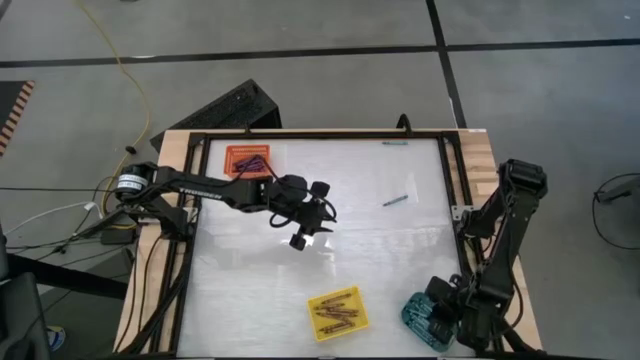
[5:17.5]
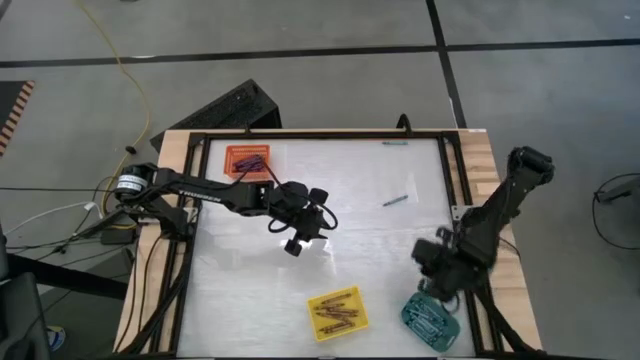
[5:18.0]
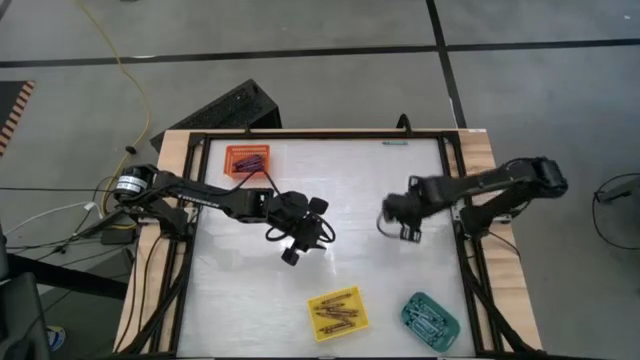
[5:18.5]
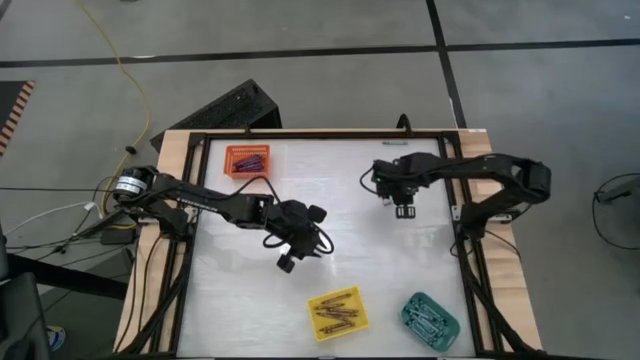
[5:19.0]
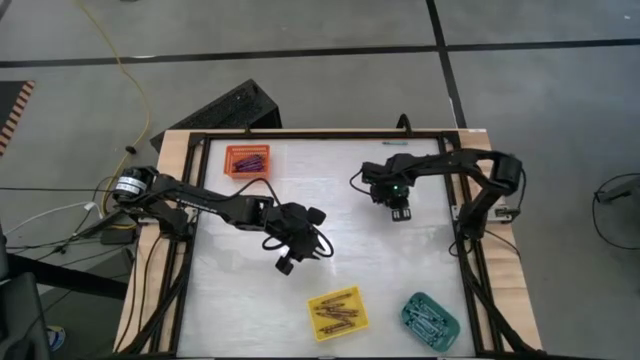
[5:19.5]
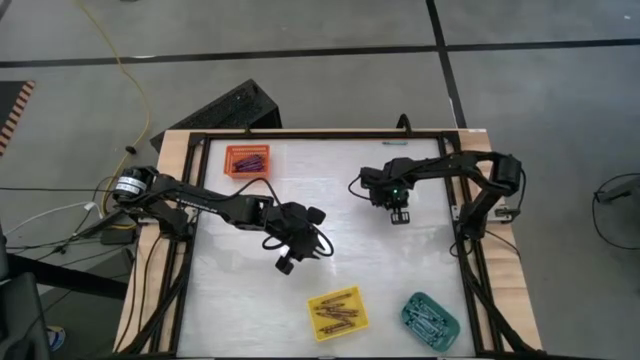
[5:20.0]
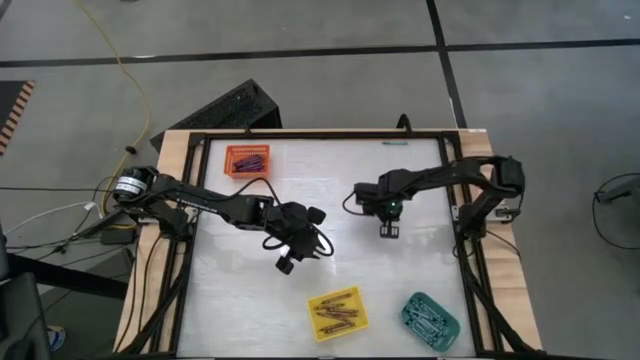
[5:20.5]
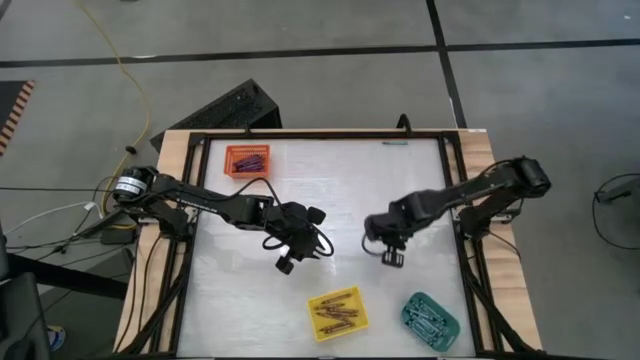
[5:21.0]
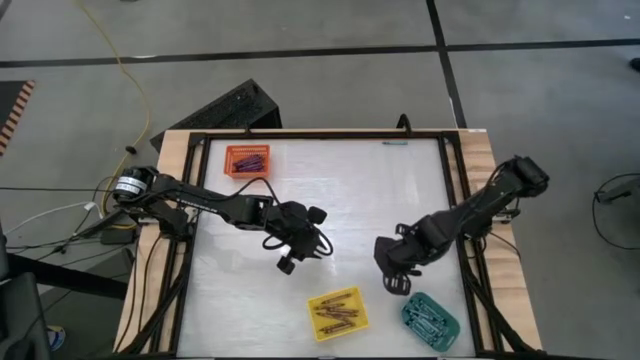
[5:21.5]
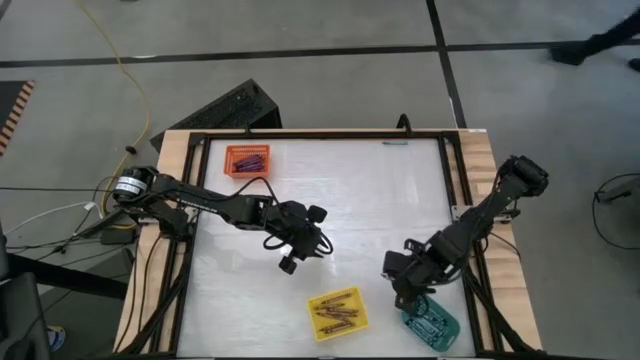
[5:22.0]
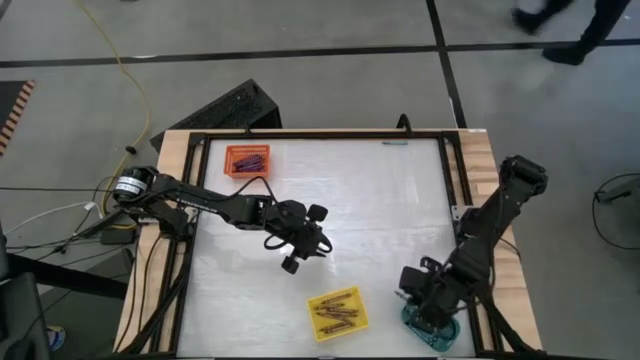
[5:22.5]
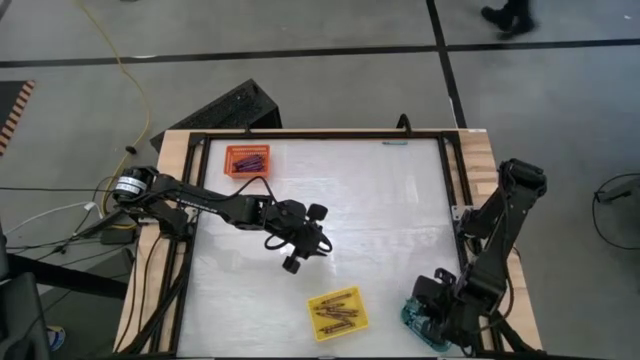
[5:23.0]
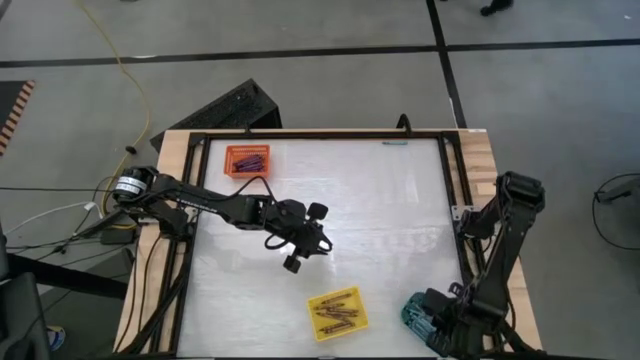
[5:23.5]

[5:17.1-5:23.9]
Task: Sort crayons
Put the green crayon into the green bin

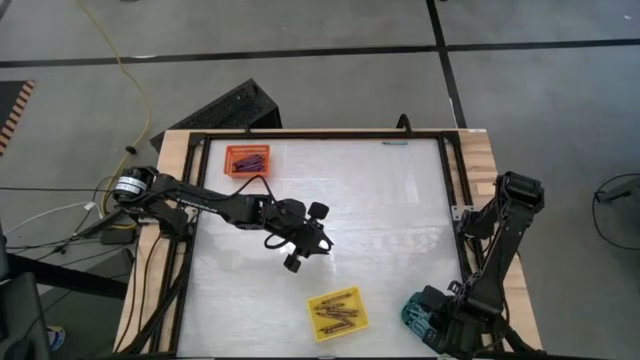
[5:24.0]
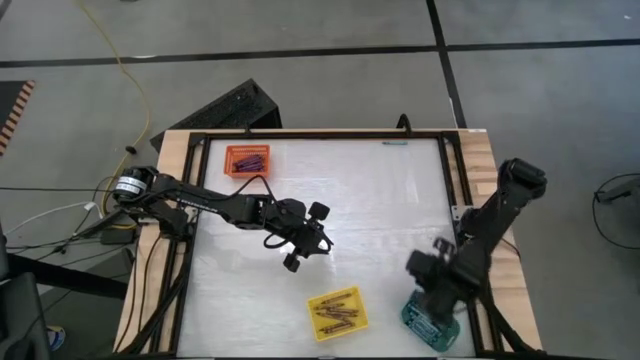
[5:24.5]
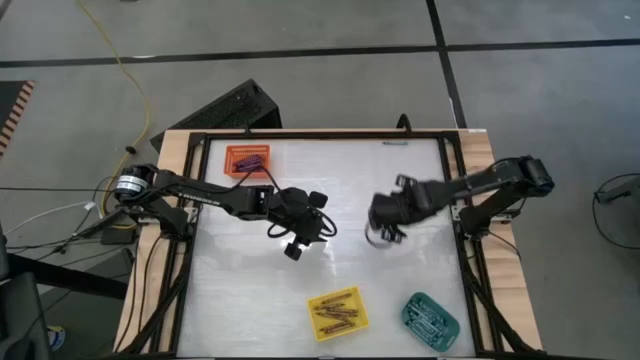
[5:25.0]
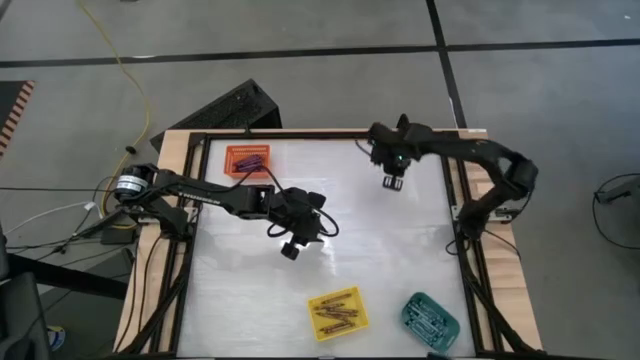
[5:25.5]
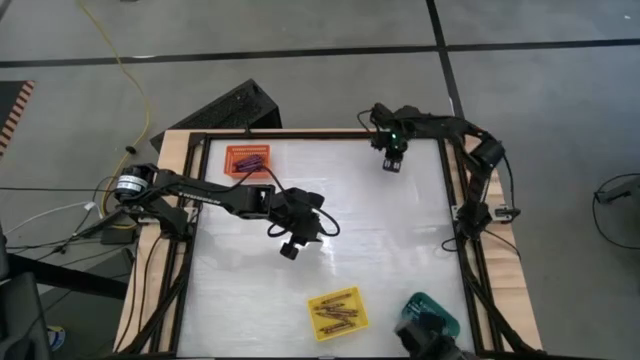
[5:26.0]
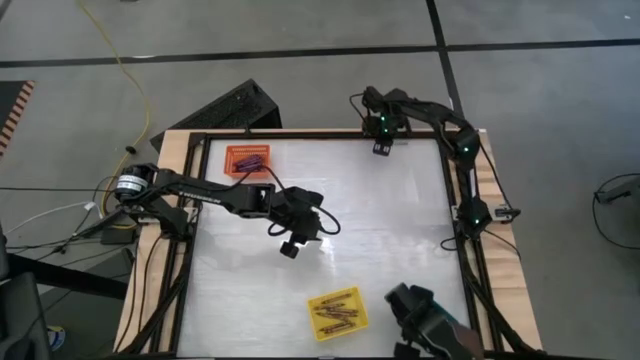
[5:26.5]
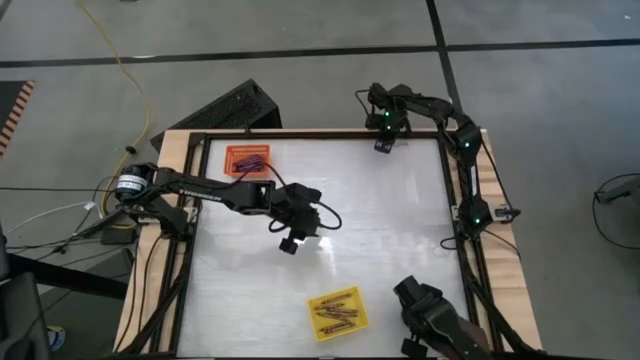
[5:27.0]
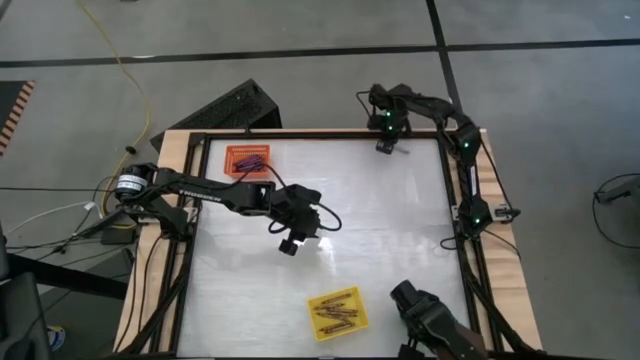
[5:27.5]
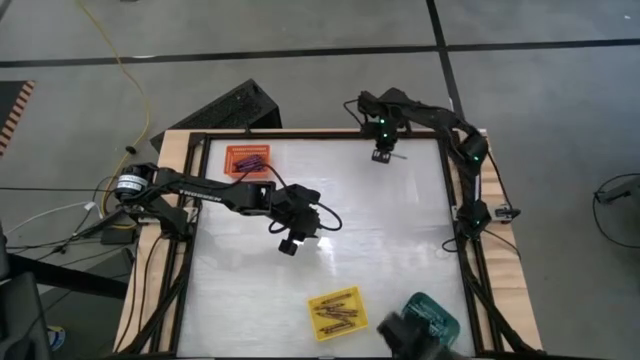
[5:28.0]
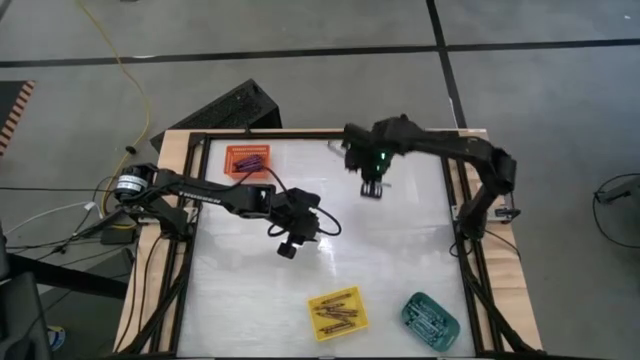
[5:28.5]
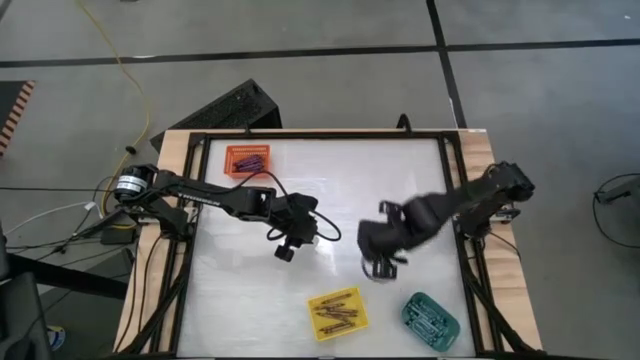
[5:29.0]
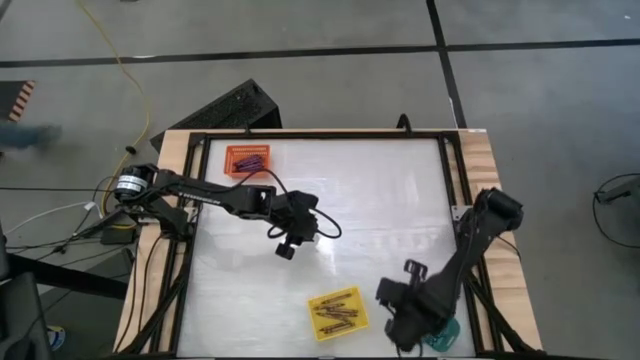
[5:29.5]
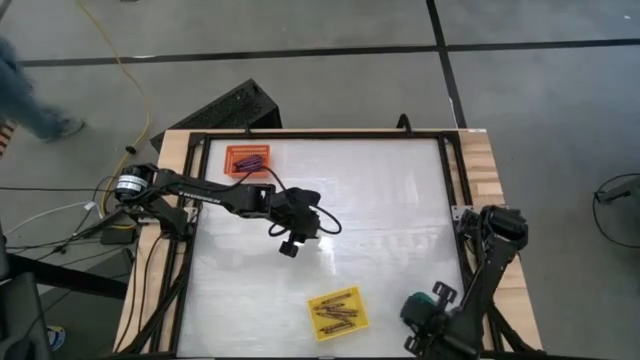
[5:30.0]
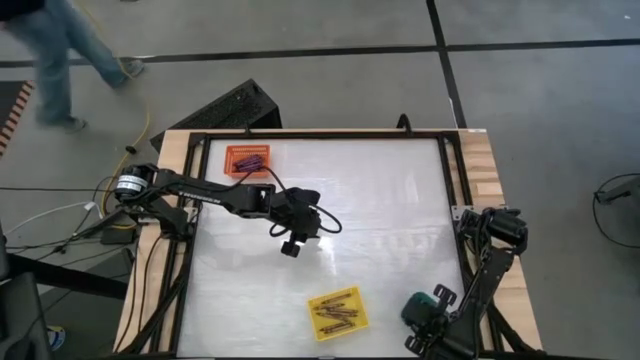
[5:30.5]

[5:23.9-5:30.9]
Put the green crayon into the green bin

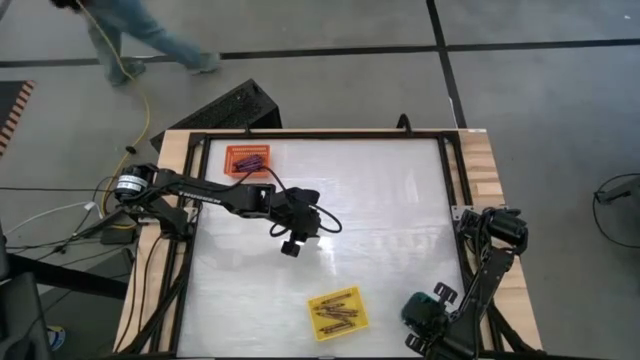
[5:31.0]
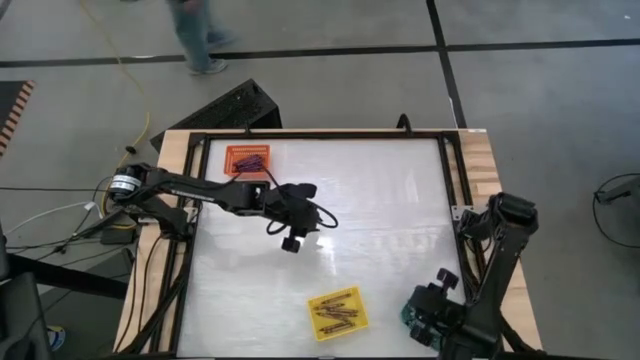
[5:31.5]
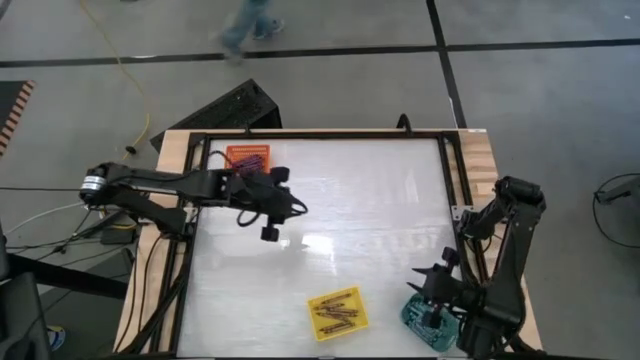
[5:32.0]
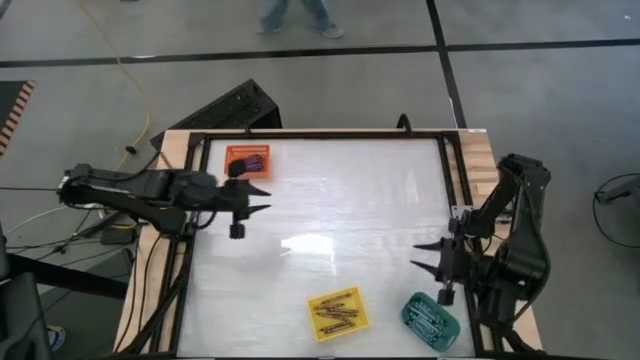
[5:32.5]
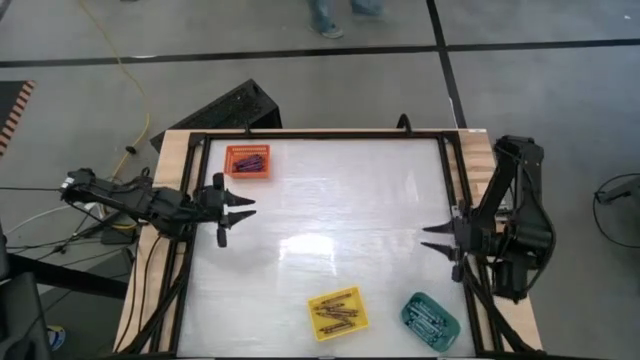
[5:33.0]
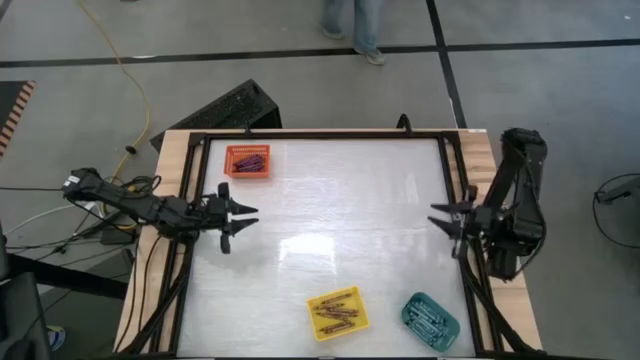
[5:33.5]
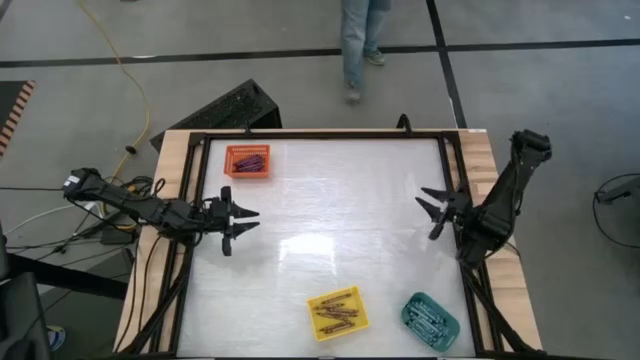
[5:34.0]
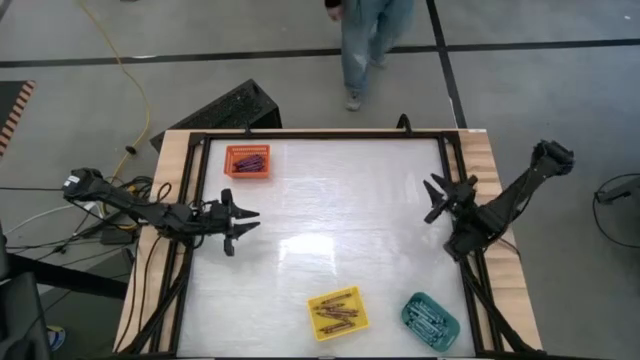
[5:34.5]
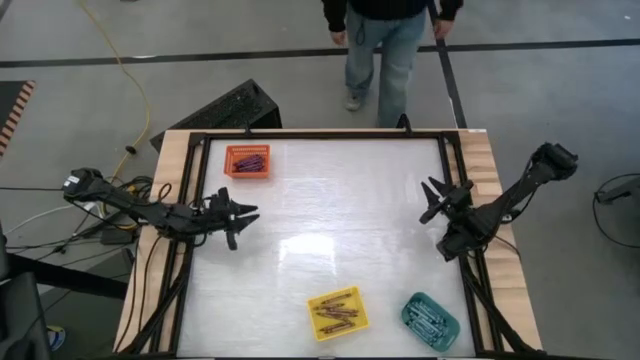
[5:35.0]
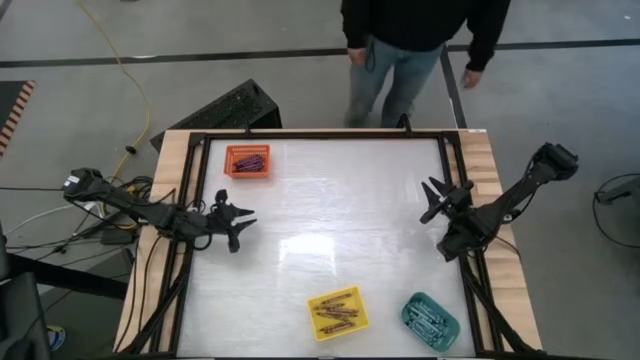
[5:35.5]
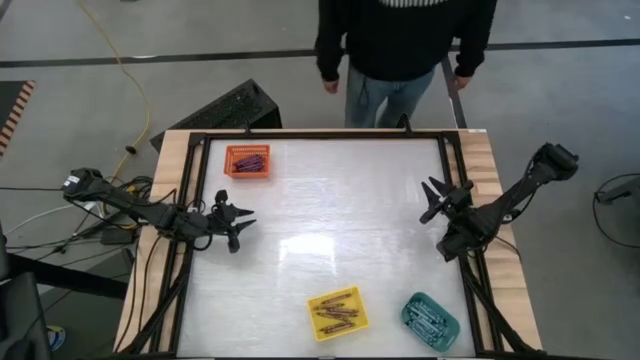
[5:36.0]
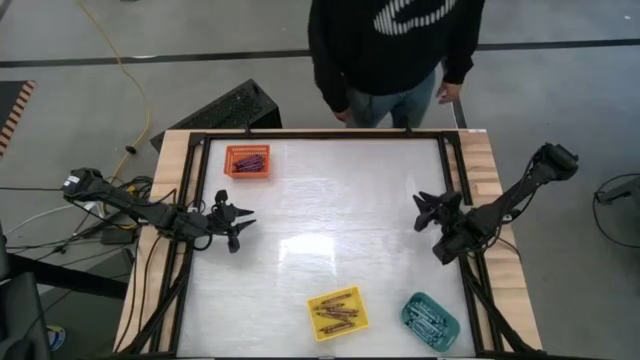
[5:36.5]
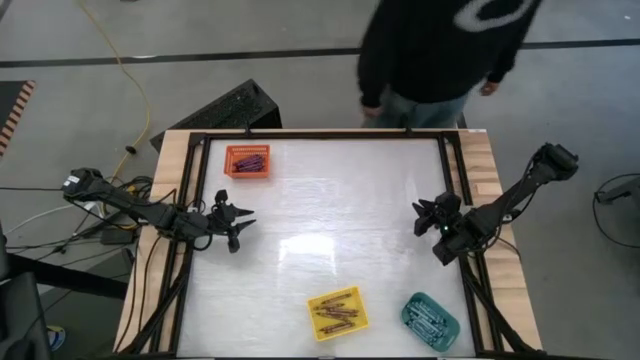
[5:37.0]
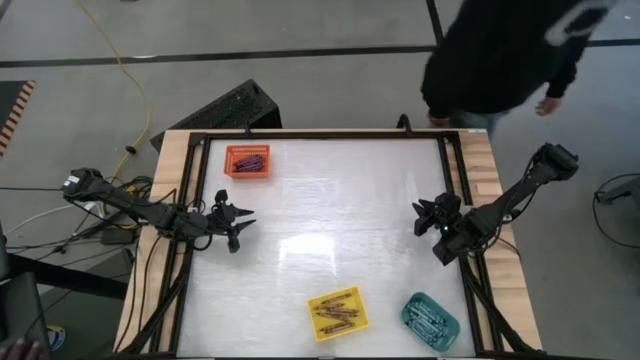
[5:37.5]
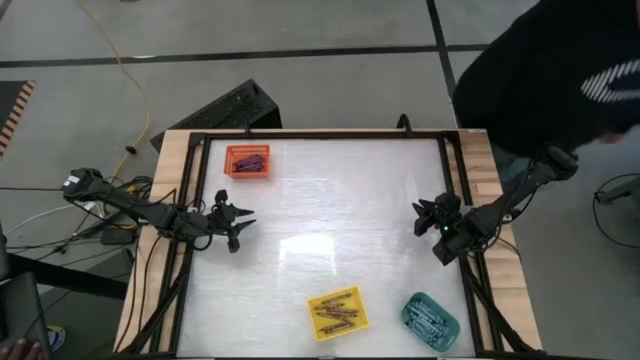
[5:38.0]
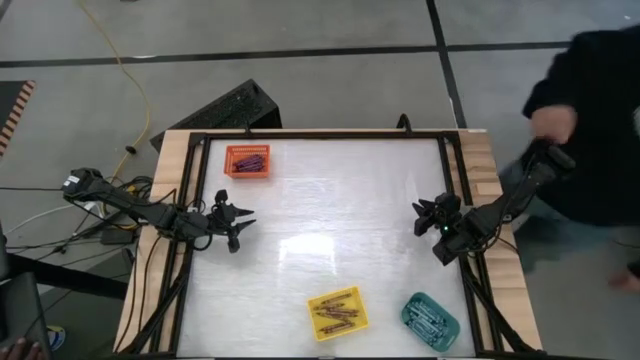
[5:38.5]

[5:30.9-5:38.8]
Return to Home Position
